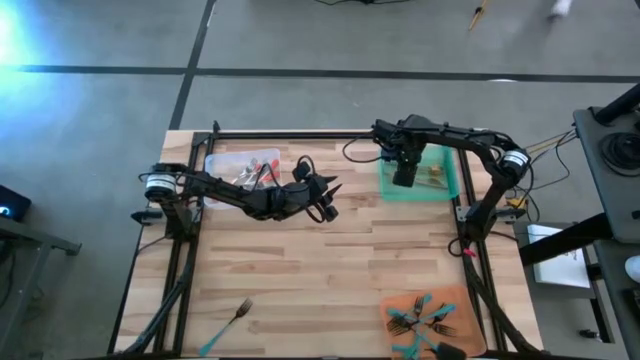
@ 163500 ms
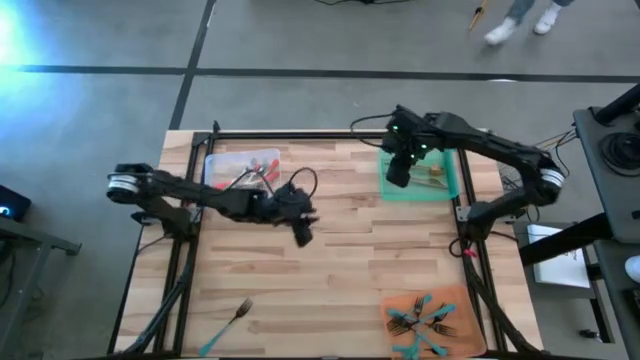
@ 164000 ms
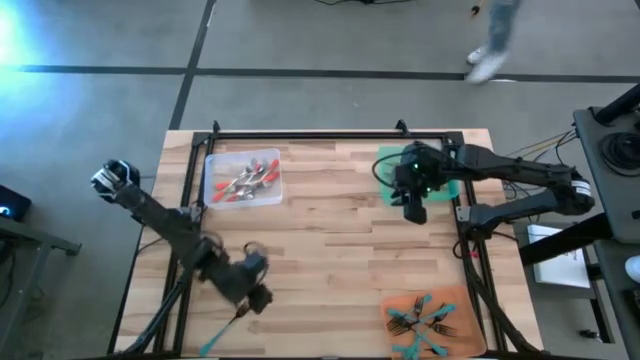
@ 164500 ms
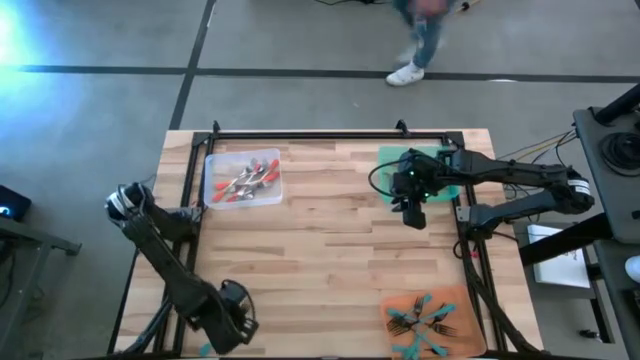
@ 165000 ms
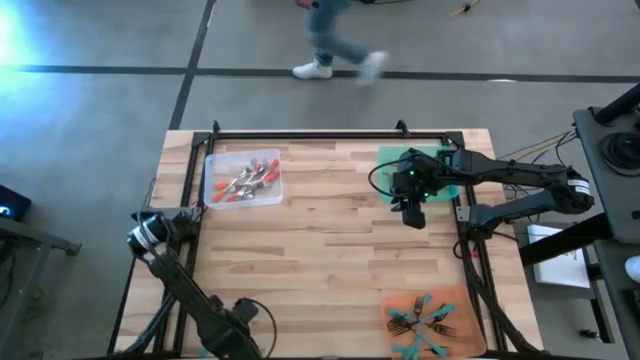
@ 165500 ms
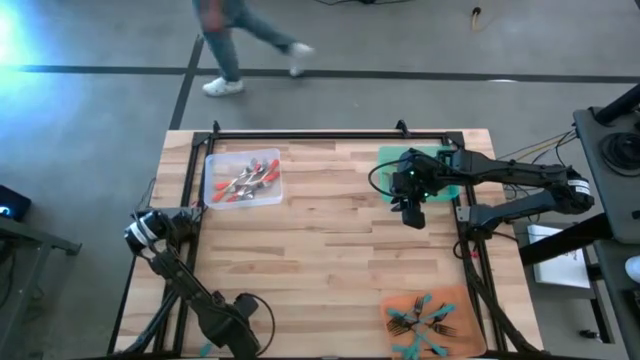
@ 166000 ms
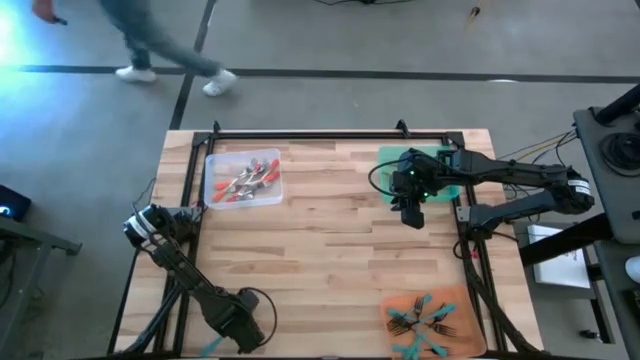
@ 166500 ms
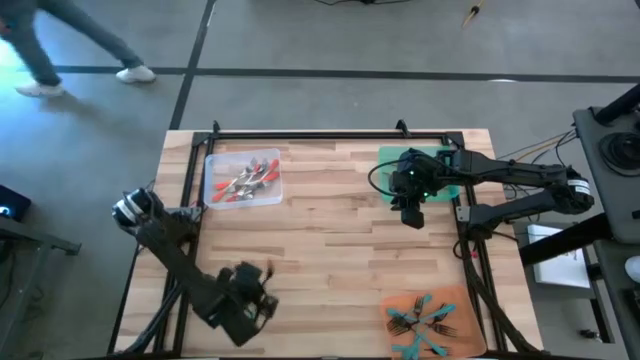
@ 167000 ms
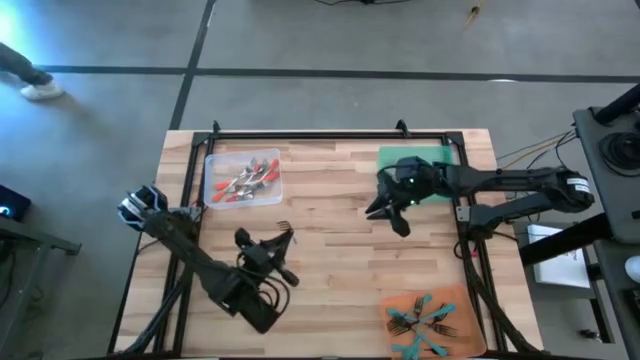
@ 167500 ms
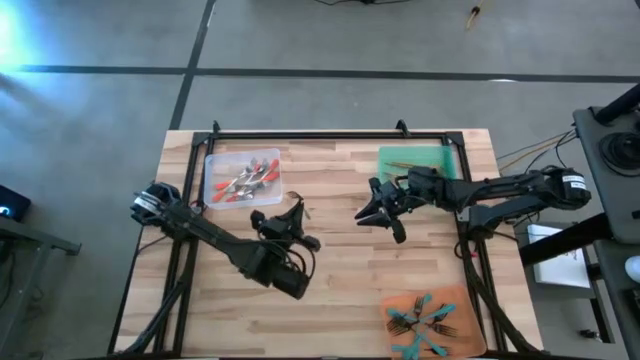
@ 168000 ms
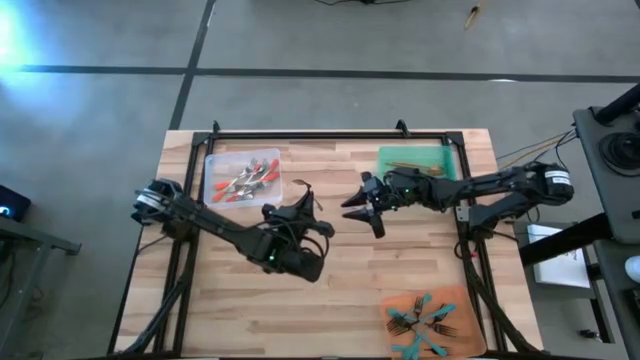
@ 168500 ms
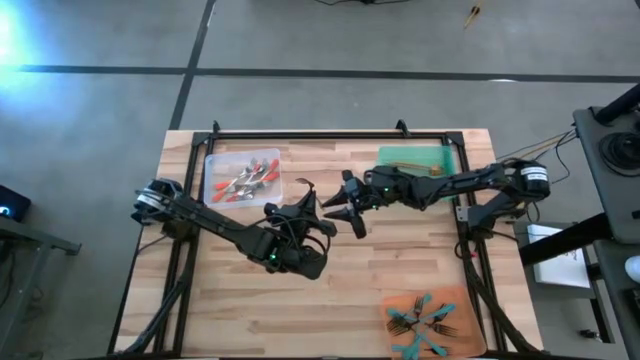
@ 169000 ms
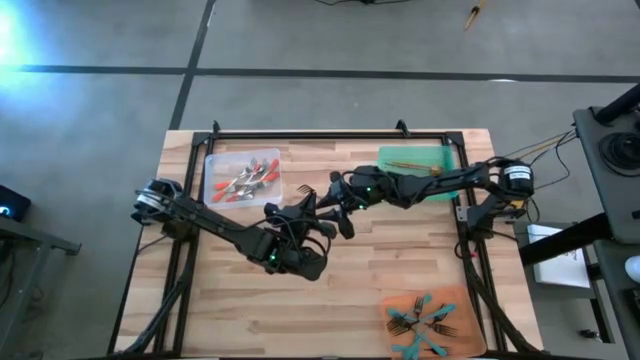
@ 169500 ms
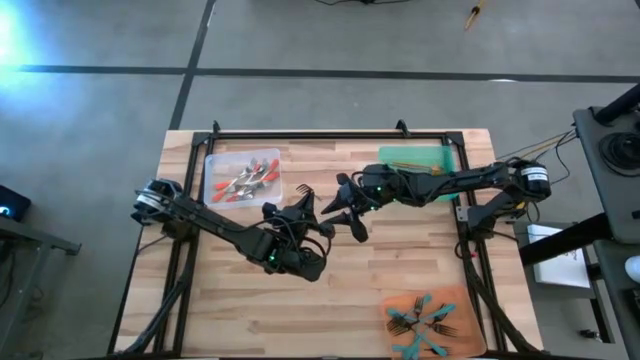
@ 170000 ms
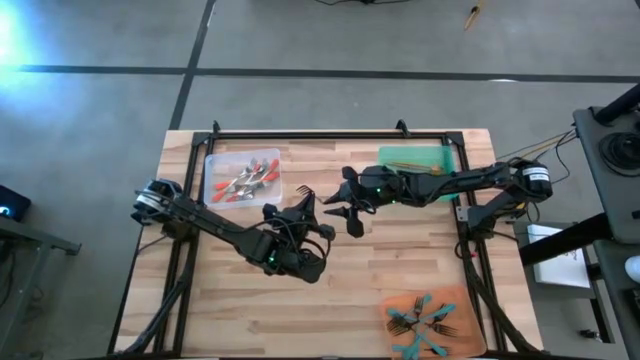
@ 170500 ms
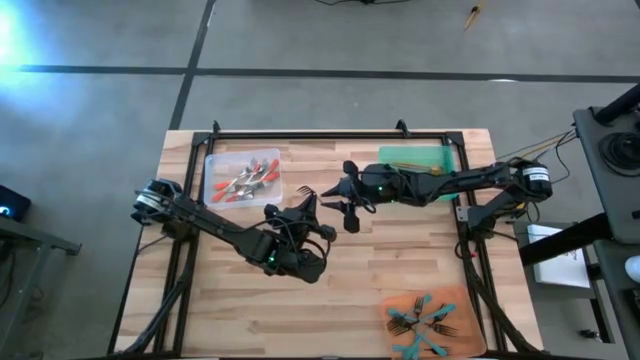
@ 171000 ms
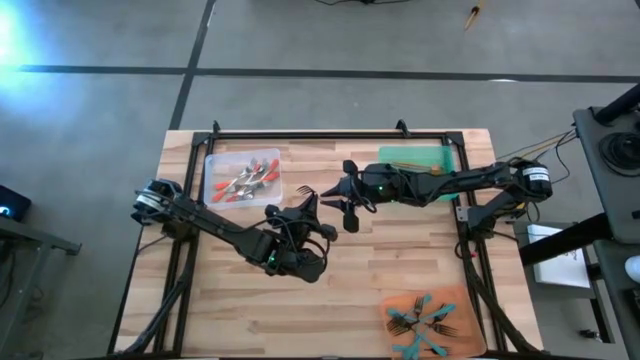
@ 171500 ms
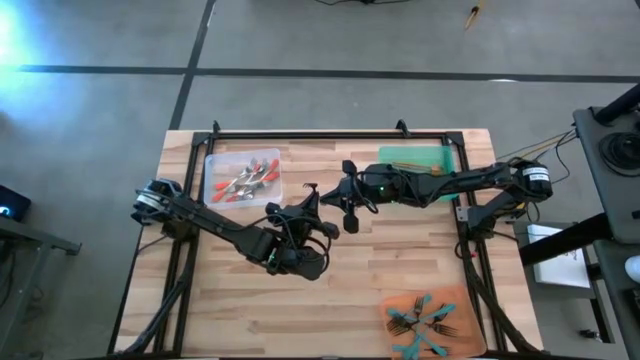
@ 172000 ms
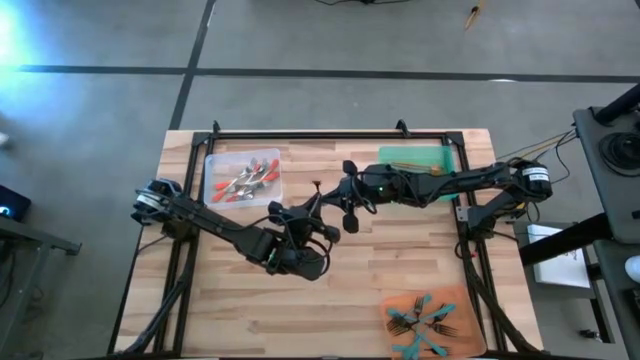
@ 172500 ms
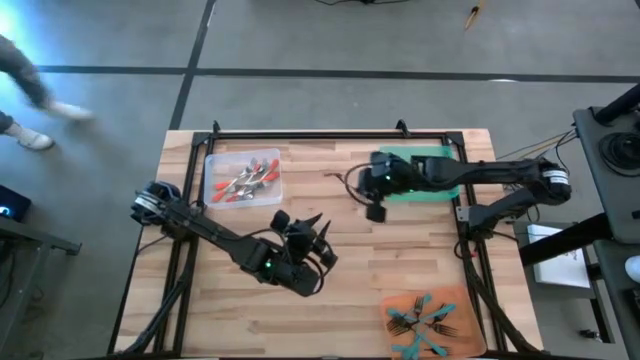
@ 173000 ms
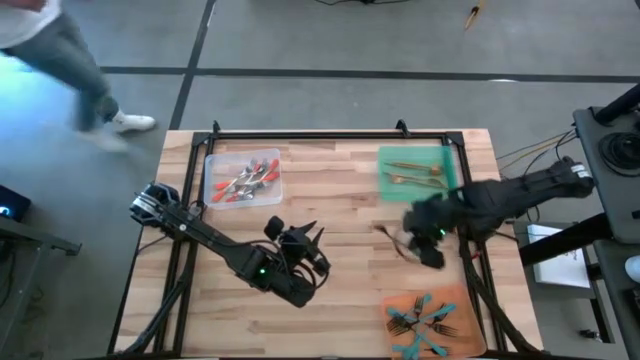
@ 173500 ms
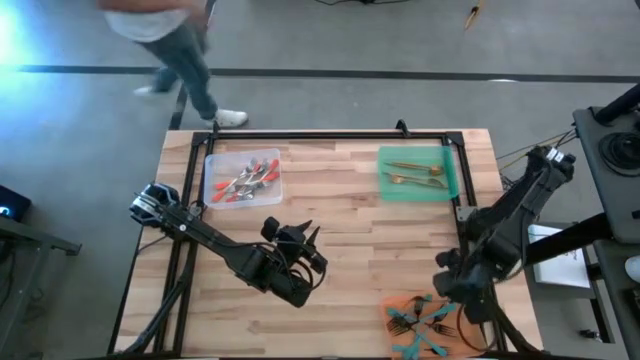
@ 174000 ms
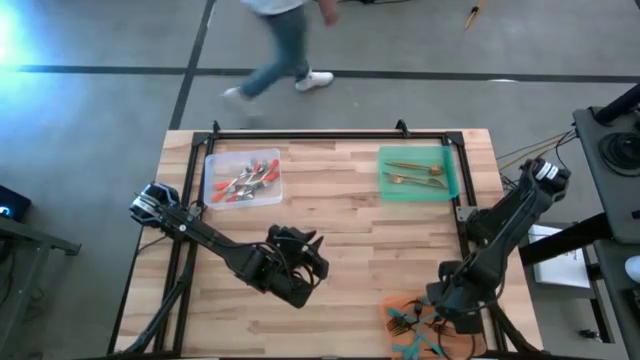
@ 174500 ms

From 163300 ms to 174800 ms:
Task: Sort silverware by color (type)
Put the blue fork into the orange bin

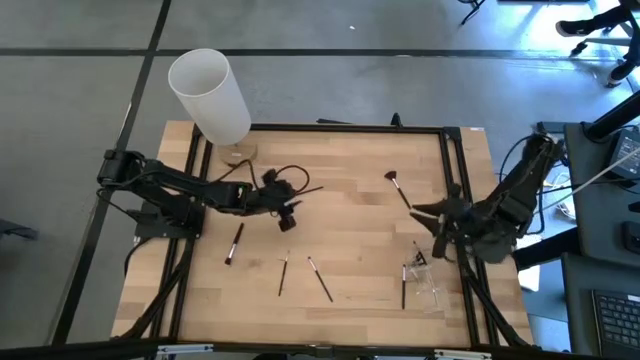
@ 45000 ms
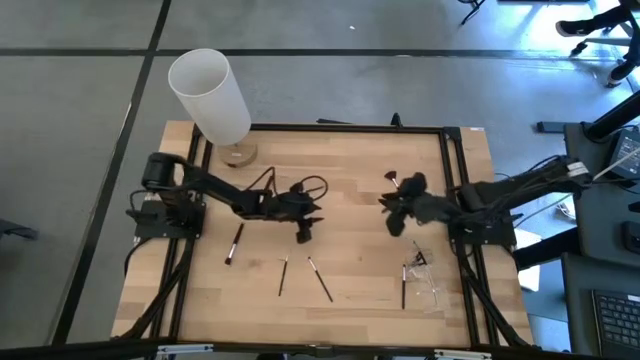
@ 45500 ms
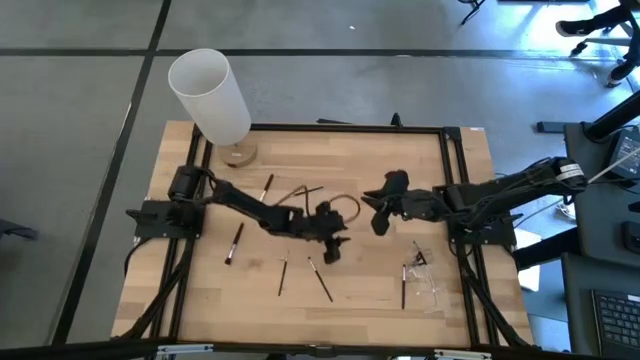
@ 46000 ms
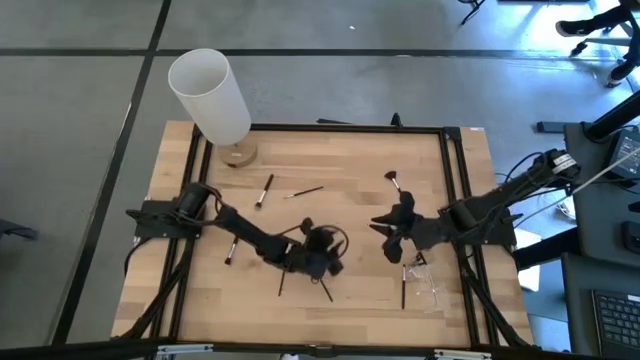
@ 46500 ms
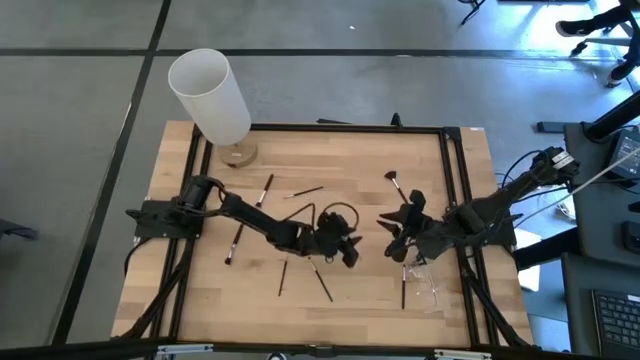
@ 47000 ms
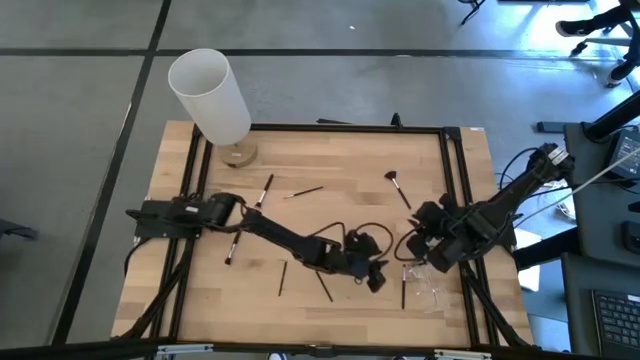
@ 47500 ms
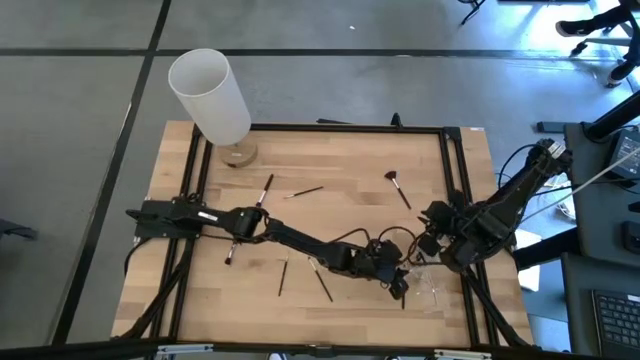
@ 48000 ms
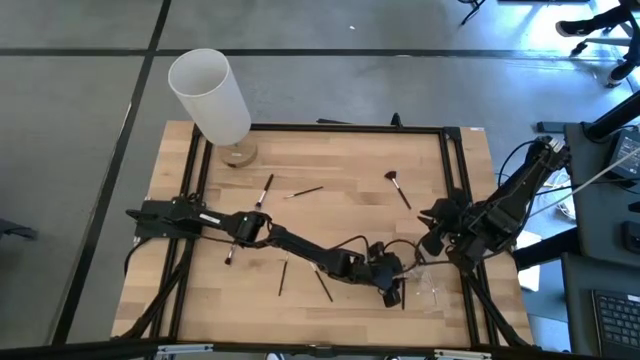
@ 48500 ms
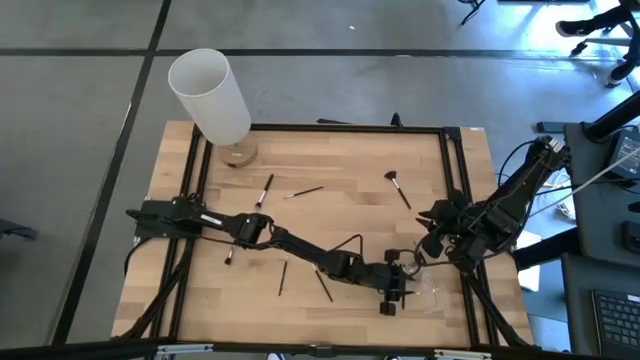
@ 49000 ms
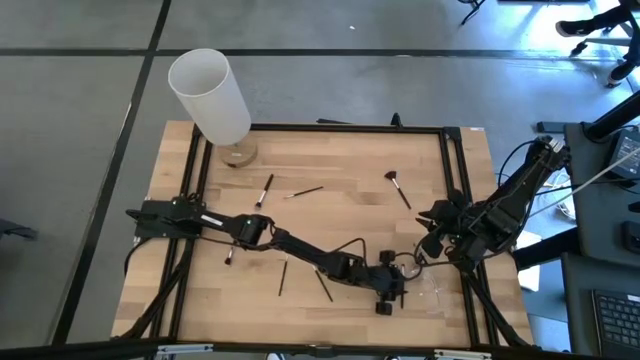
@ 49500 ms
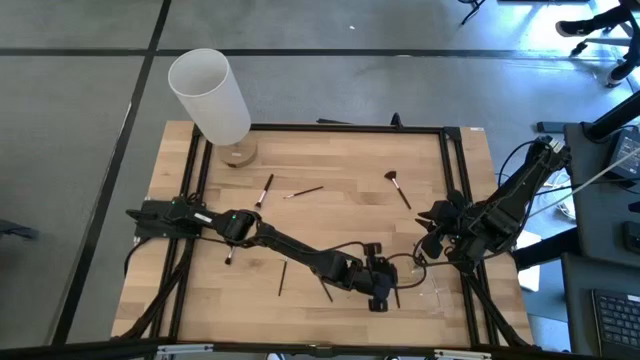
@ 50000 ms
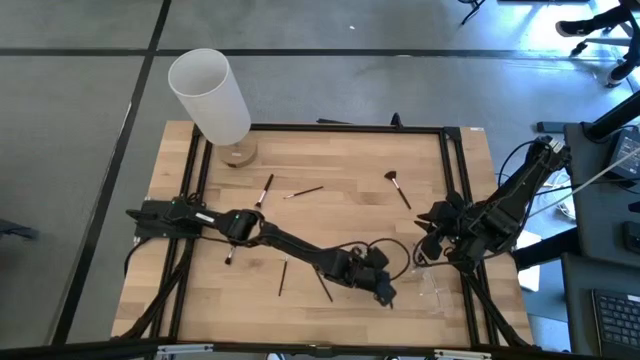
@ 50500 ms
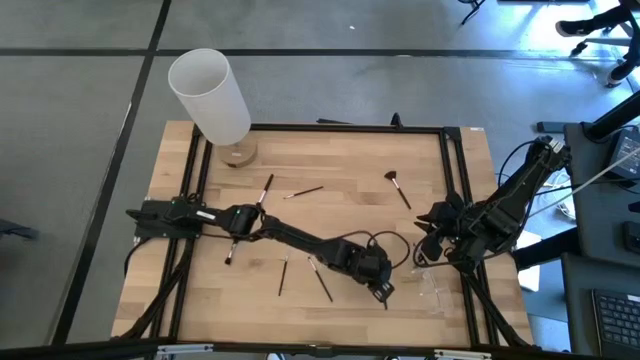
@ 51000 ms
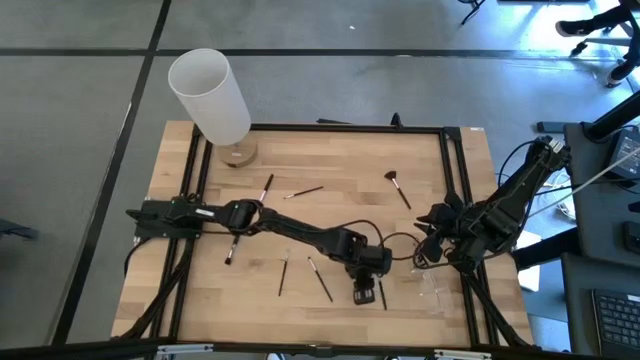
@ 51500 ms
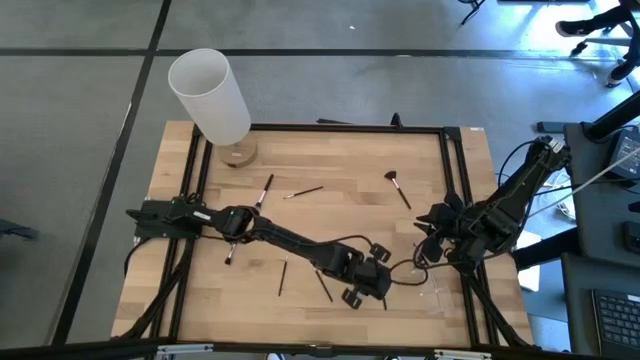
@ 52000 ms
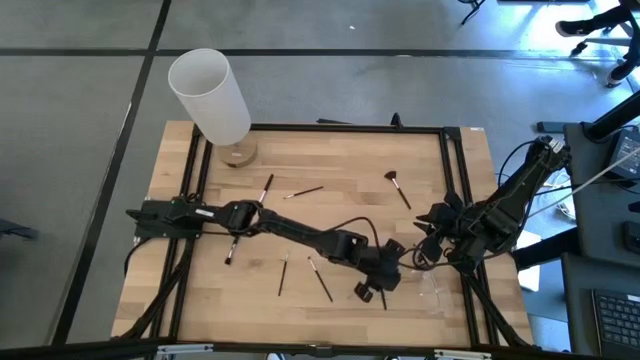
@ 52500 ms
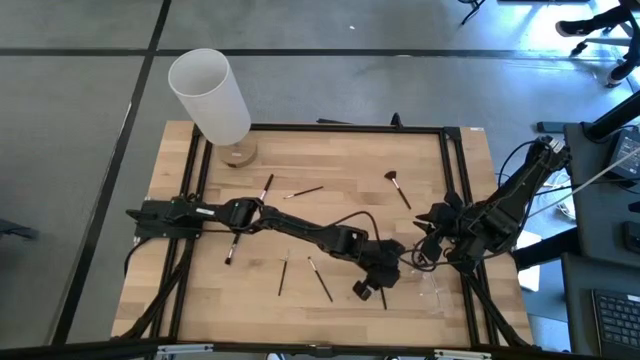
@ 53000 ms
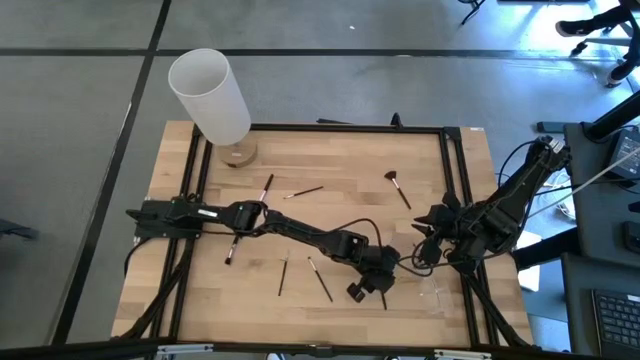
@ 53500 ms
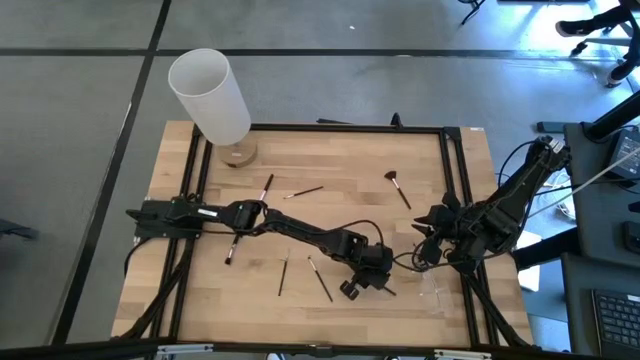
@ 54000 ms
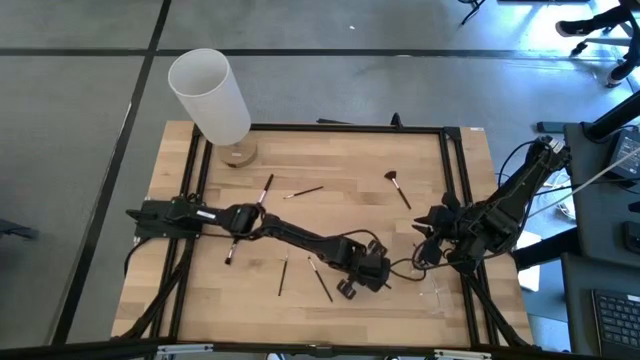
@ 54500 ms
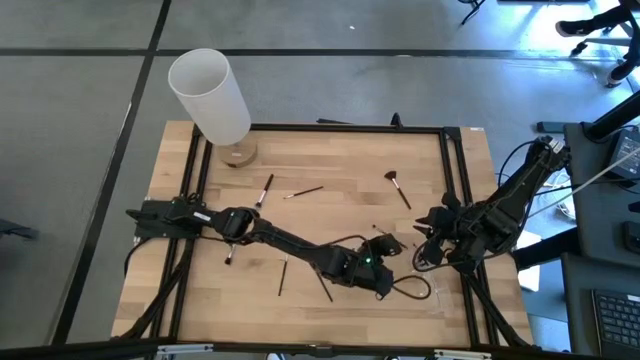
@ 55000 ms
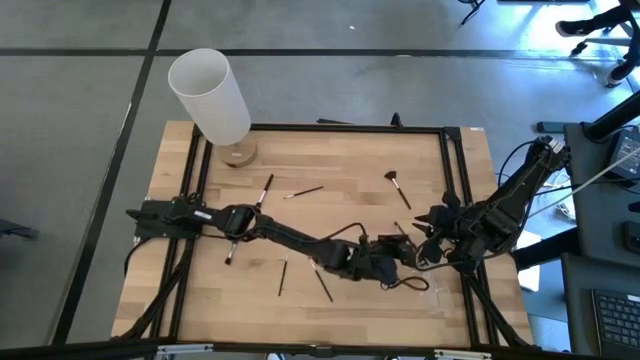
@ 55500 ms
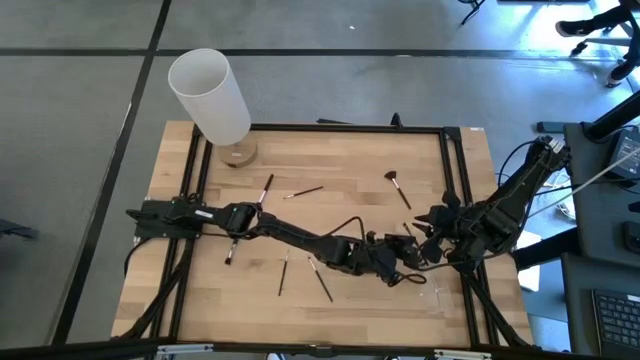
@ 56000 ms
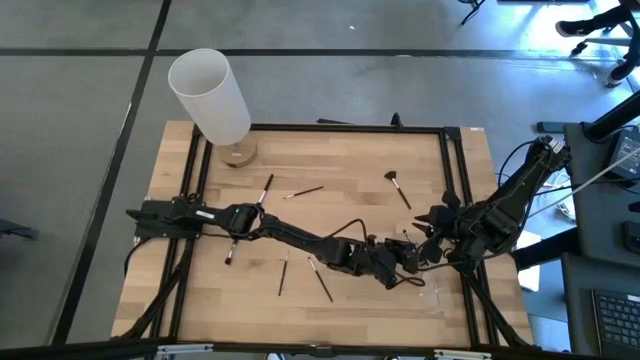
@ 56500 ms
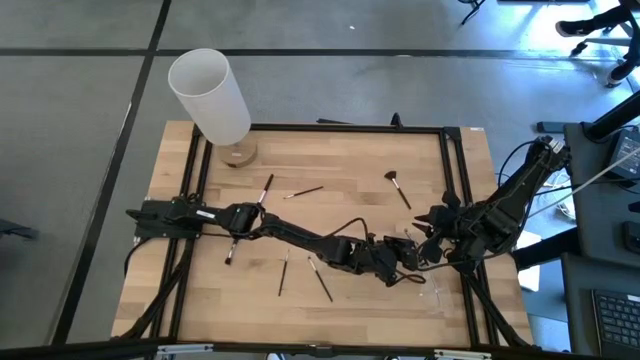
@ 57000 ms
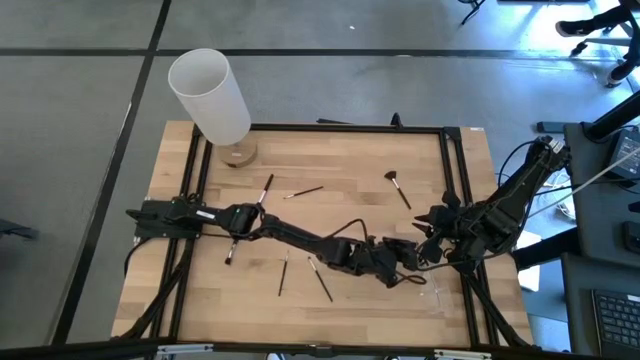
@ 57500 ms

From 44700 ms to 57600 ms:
Task: Put items in baskets/containers
Put the black angled eyeshadow brush into the transparent organizer
